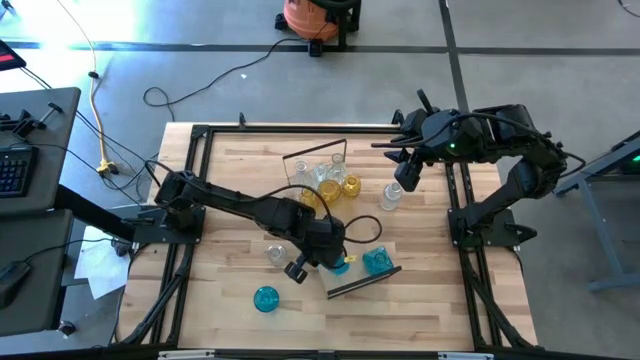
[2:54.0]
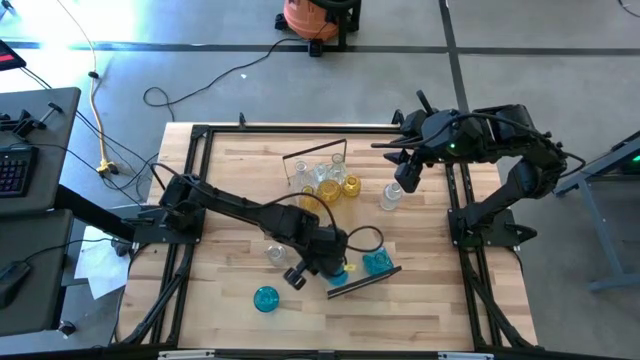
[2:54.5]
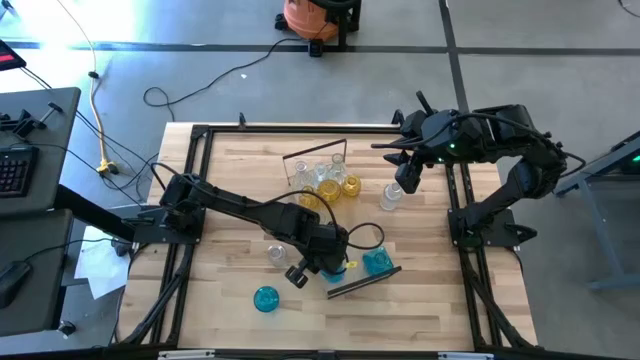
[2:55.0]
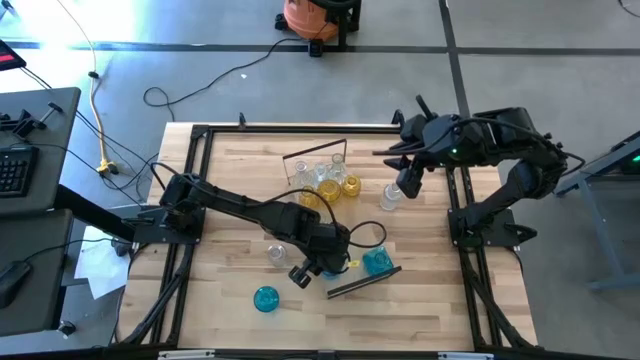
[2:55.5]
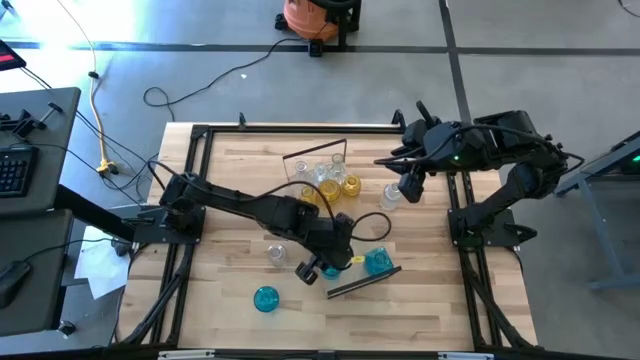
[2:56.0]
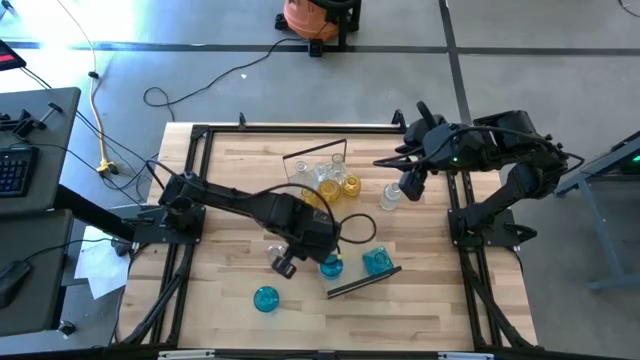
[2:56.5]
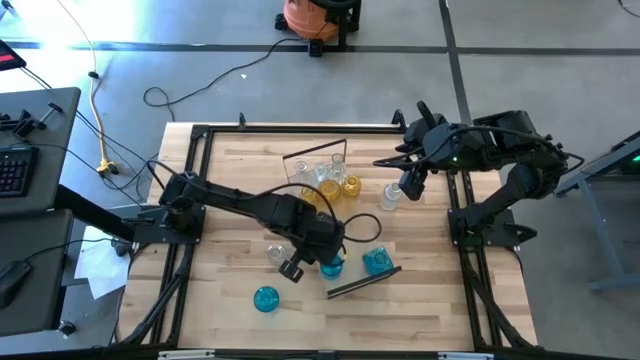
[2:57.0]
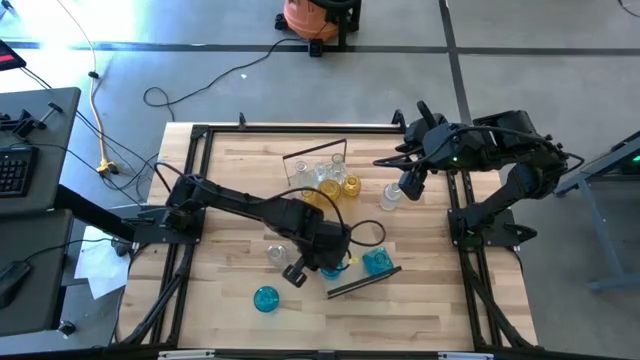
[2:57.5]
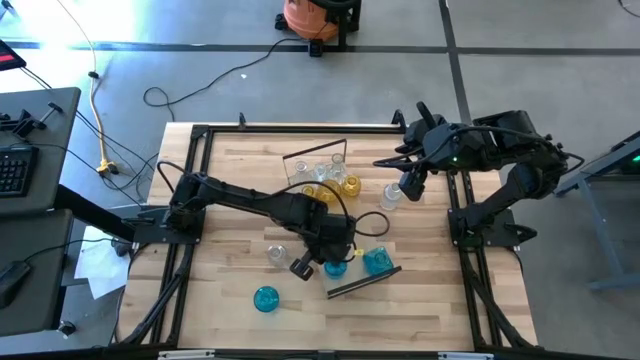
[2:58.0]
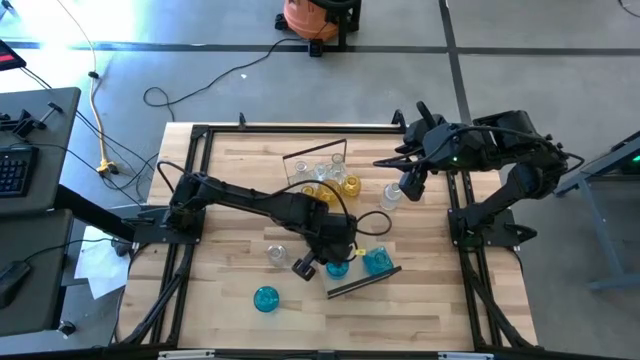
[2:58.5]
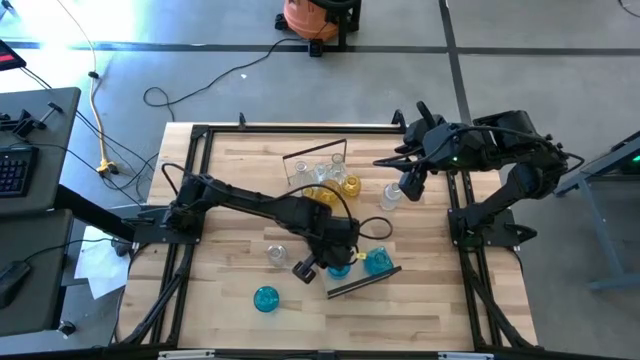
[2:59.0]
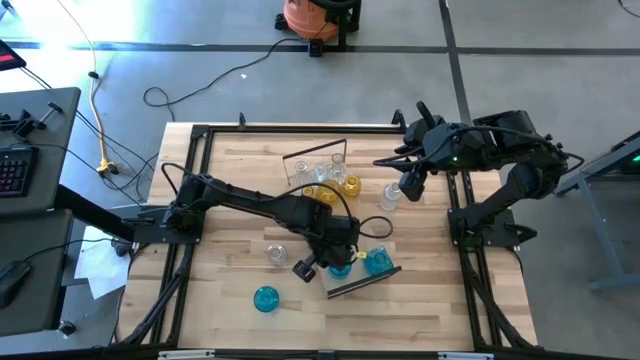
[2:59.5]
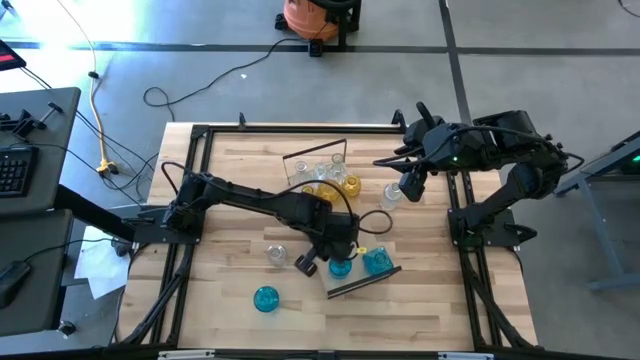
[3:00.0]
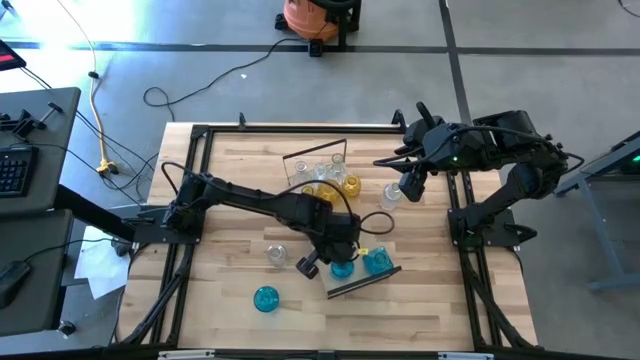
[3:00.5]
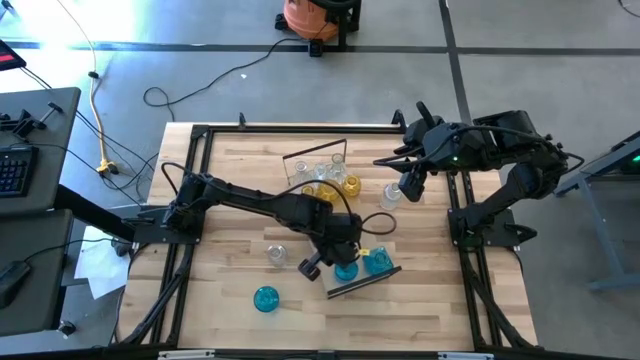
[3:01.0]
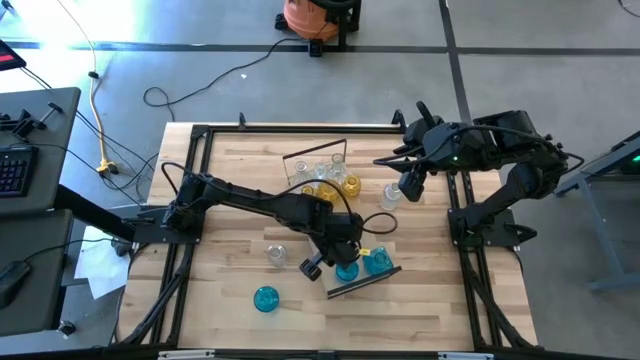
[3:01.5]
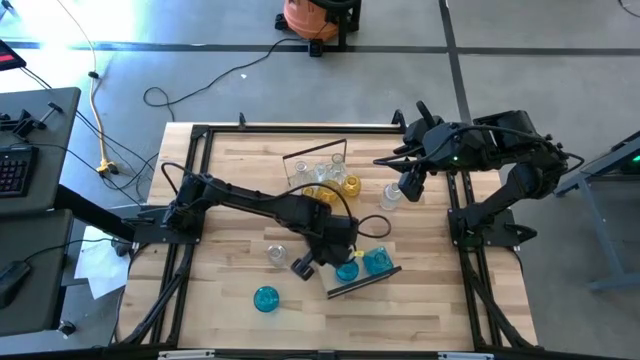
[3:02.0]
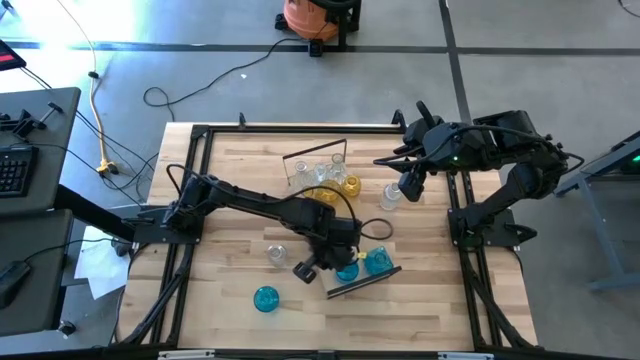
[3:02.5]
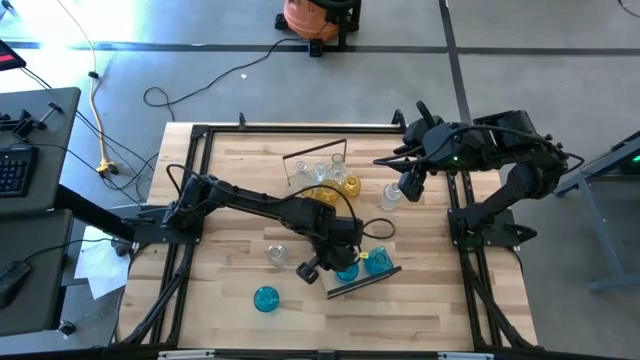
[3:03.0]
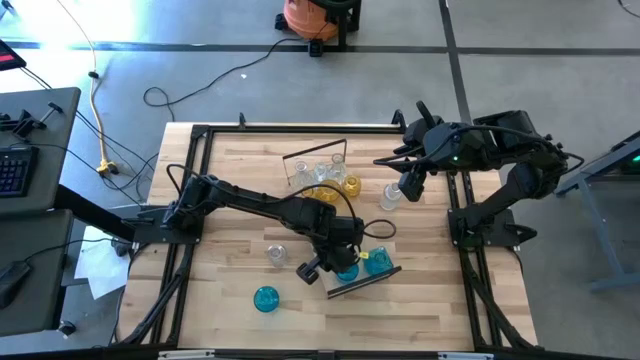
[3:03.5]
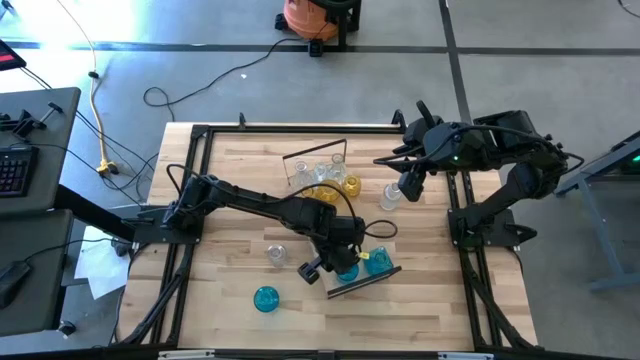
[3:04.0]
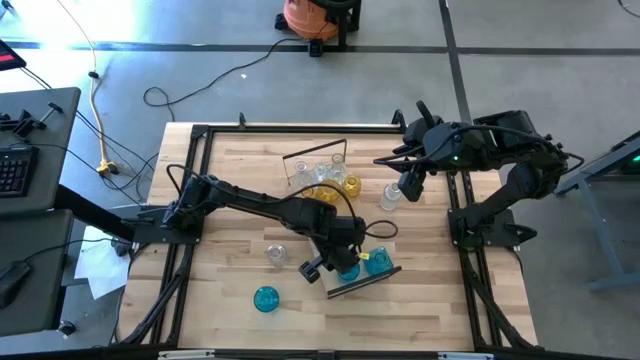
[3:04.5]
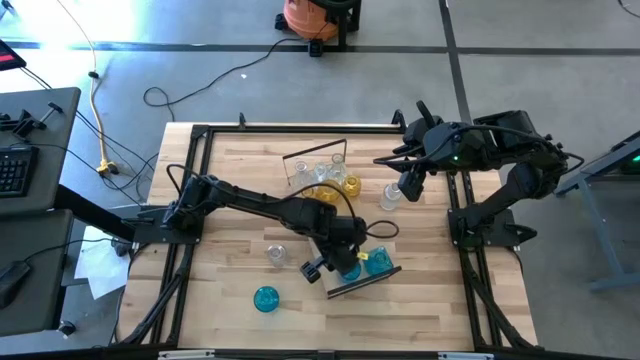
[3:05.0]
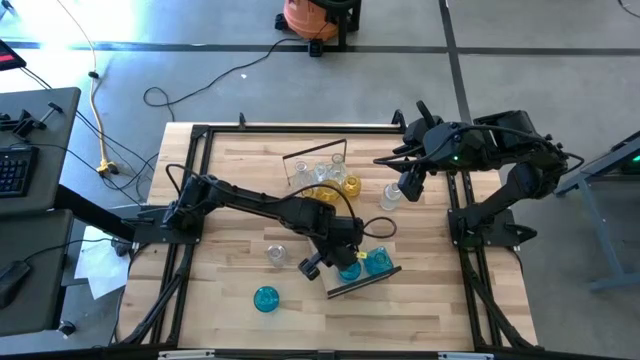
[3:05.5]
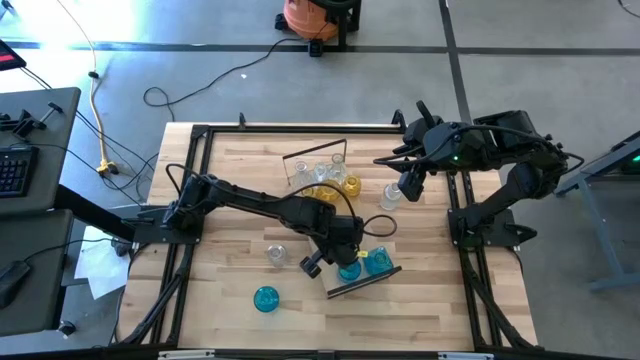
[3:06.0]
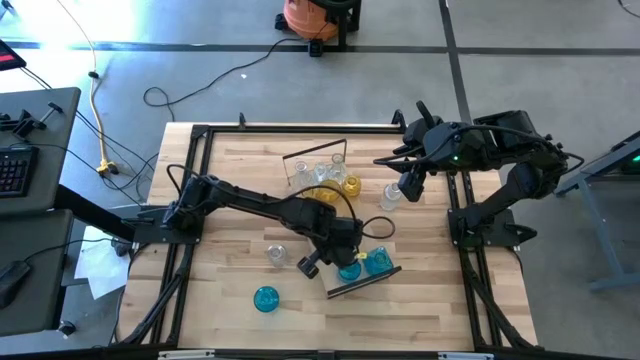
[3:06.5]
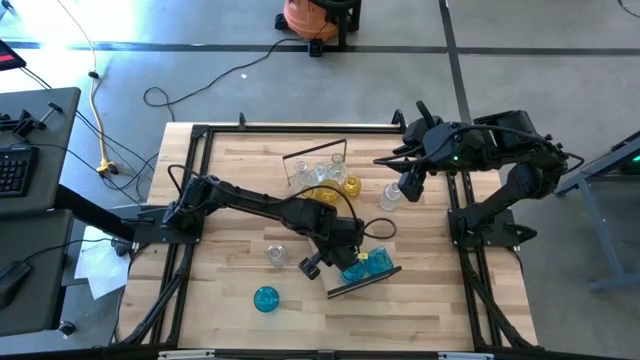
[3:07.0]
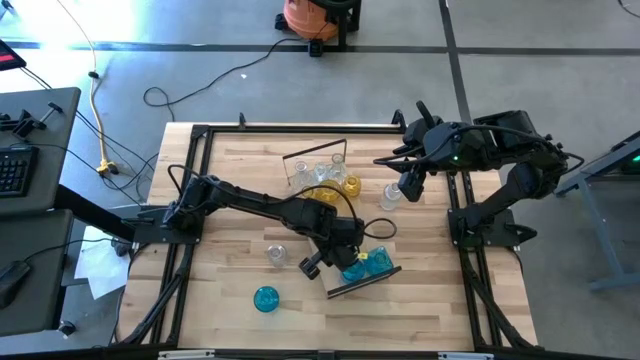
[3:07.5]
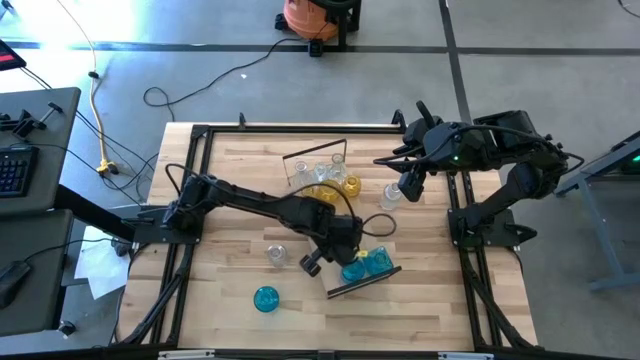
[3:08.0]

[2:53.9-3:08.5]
Task: sort vases onto shelf
Put the blue crystal vase on the shelf aligned with the other blue crystal vase

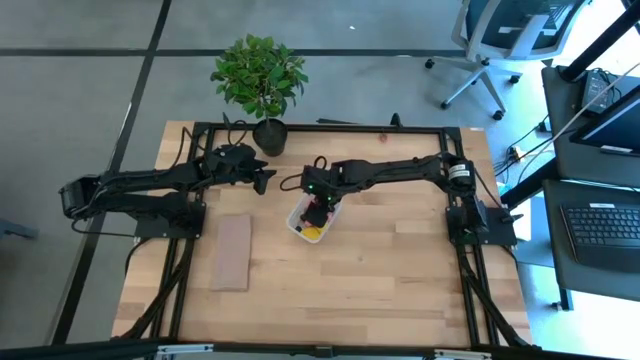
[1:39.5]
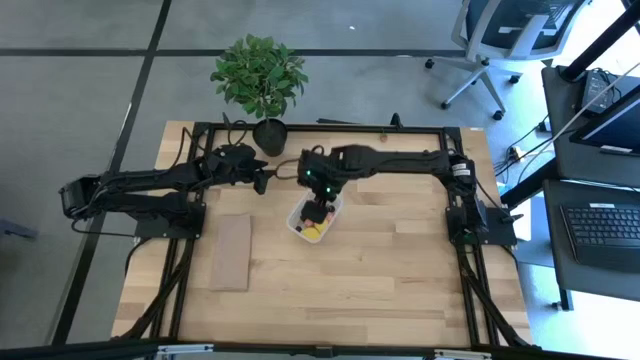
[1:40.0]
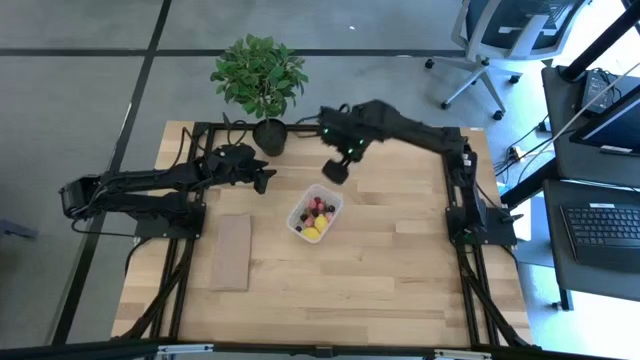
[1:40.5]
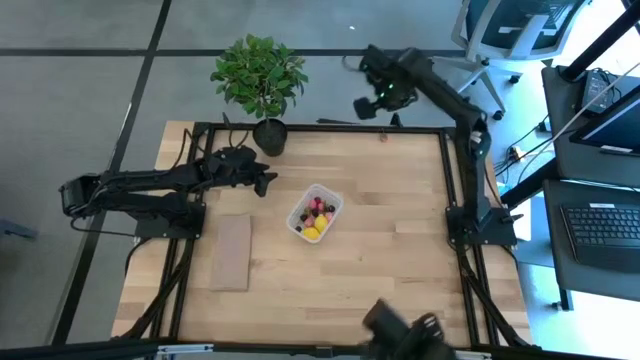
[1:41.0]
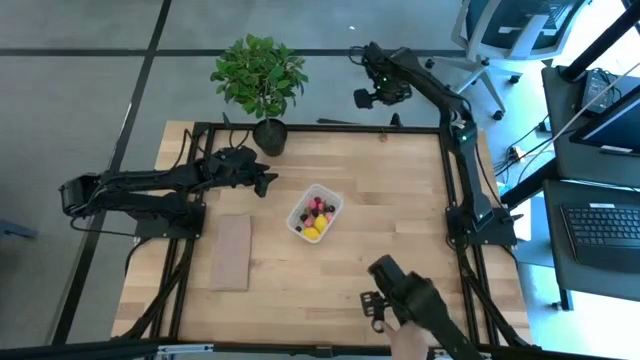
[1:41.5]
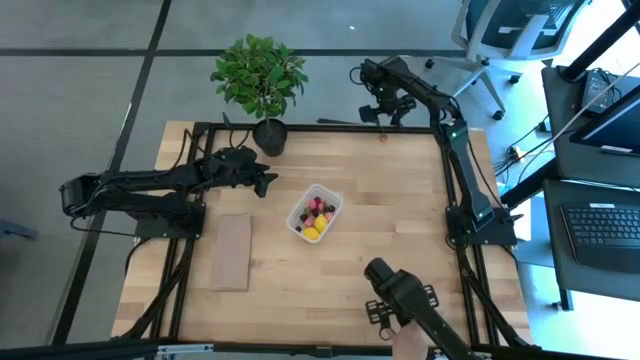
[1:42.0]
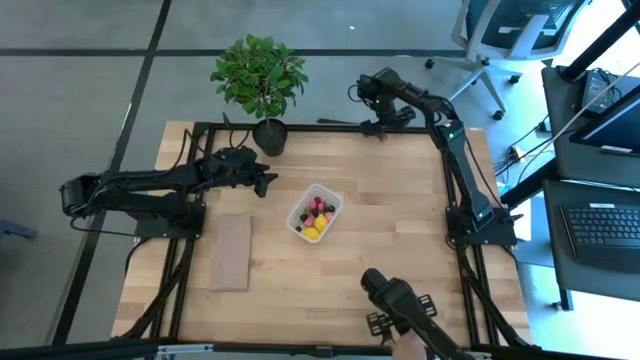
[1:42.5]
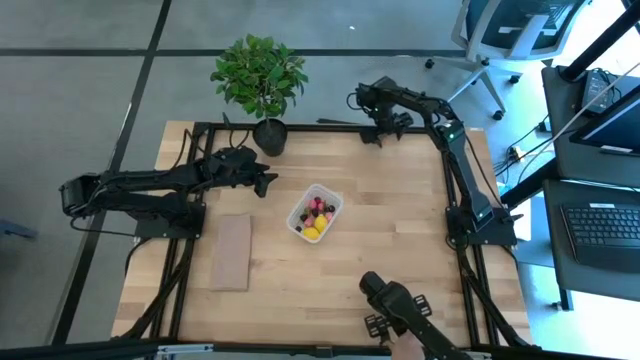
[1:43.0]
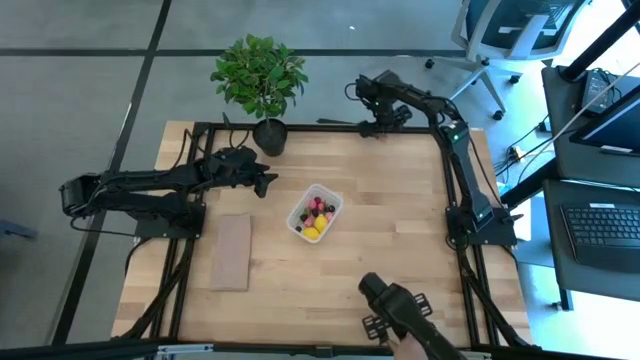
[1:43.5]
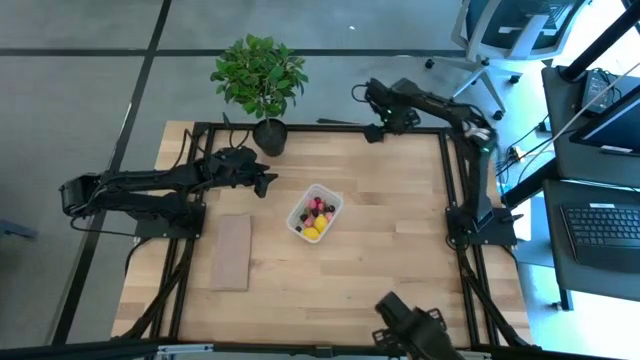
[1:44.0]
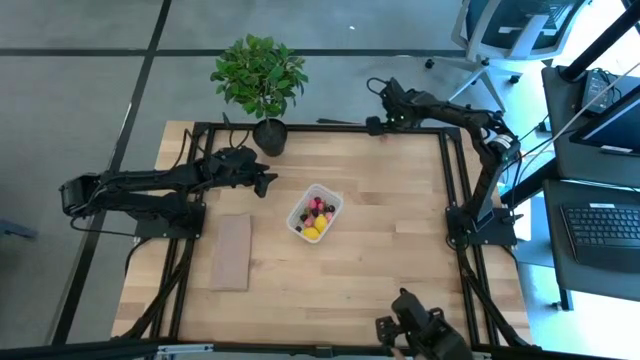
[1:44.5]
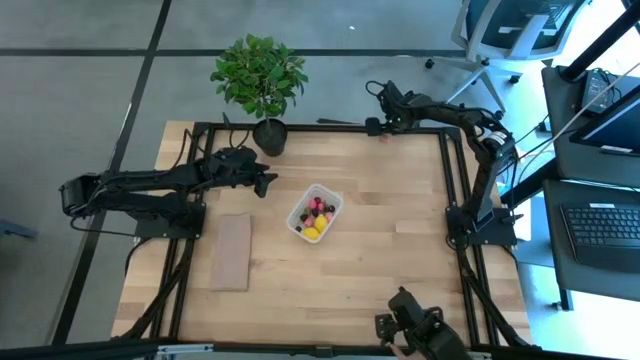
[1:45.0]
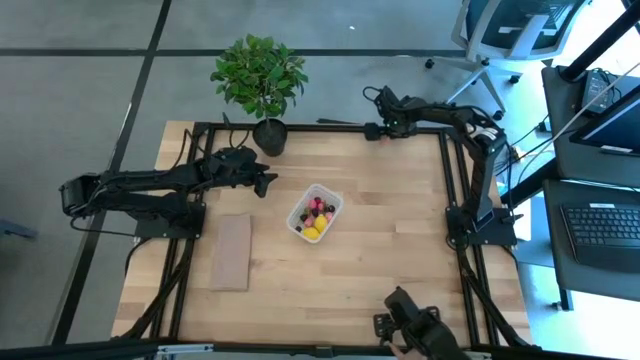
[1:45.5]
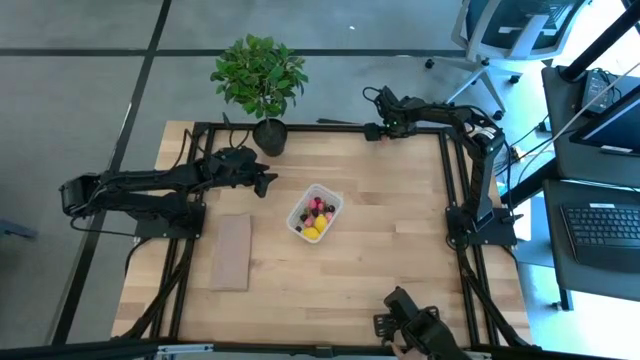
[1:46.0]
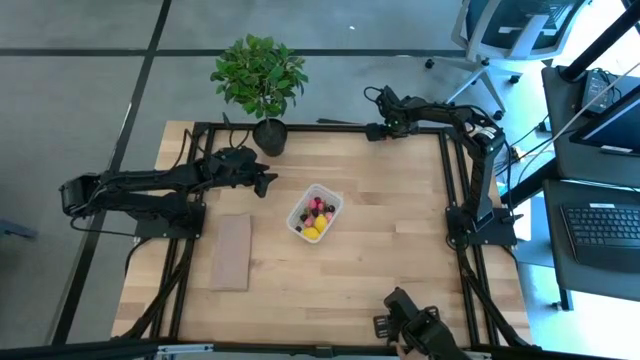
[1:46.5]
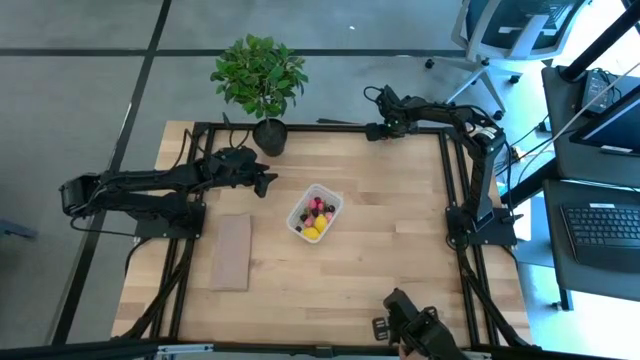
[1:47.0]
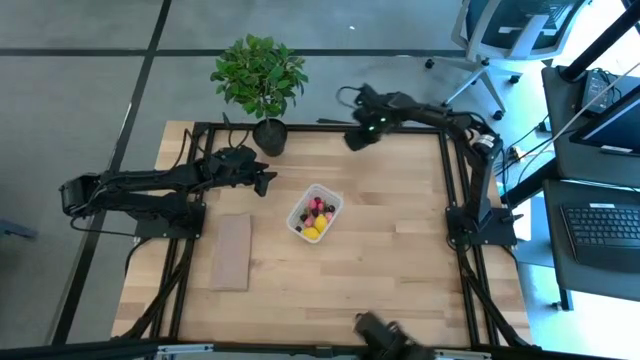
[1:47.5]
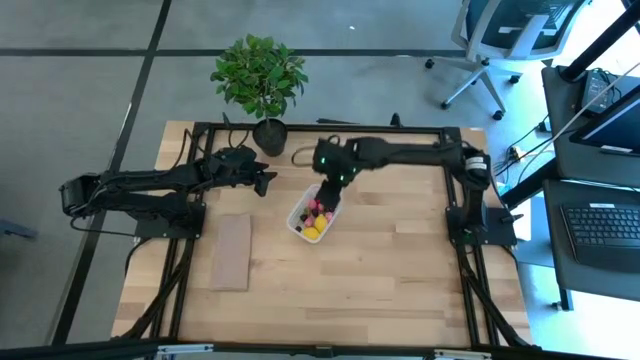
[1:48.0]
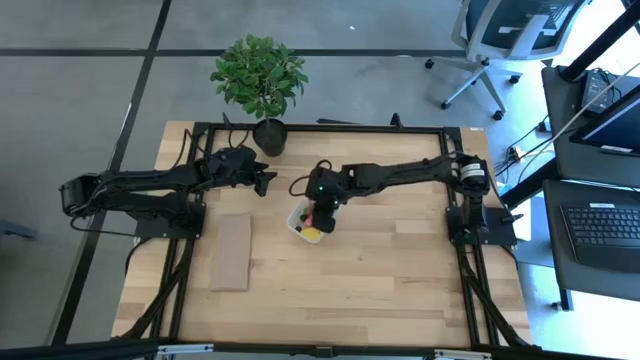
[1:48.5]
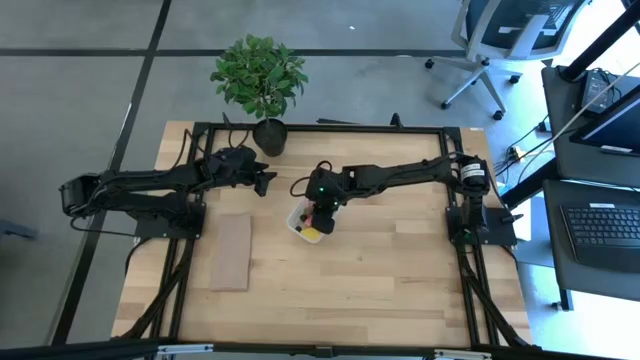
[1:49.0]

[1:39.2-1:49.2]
Task: Pick and placing Produce into tupperware
Put the strawberry into the transparent bin
